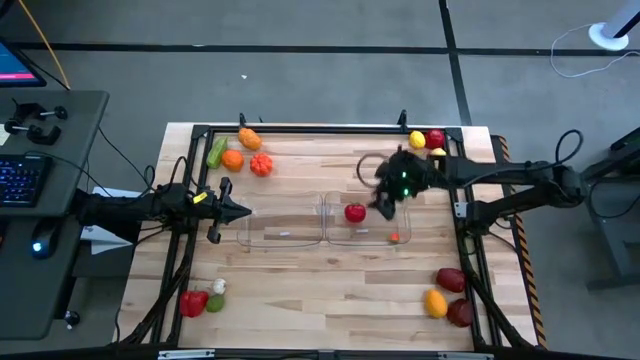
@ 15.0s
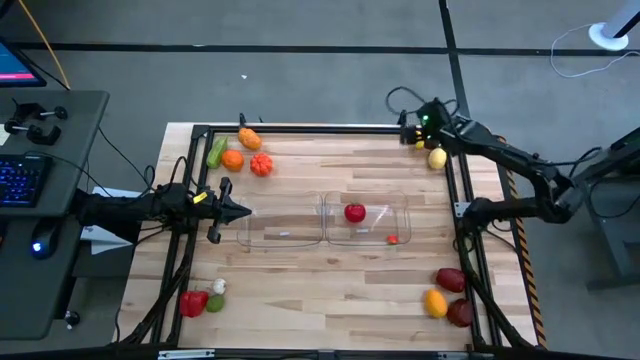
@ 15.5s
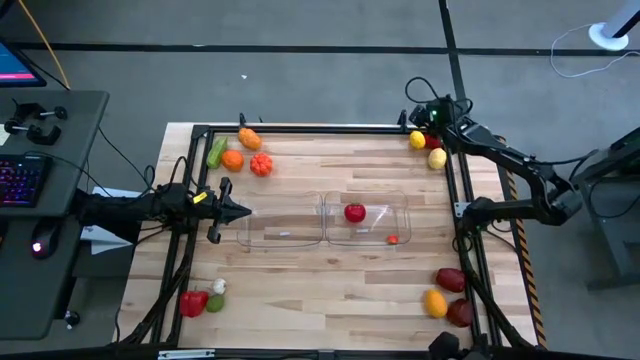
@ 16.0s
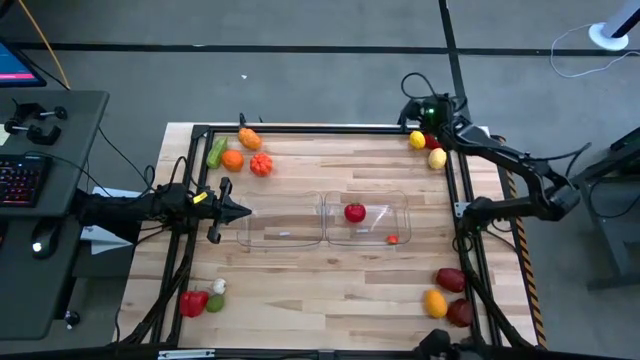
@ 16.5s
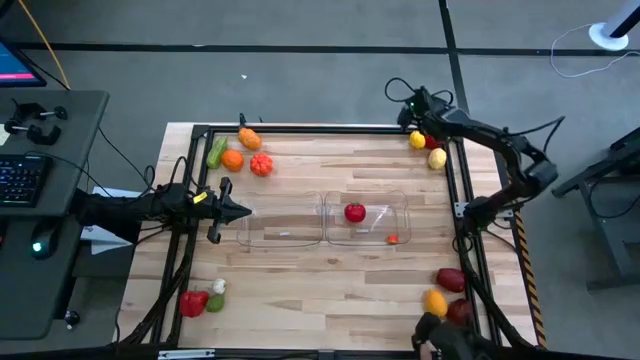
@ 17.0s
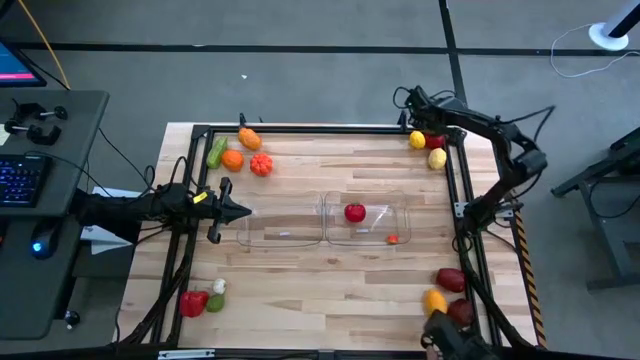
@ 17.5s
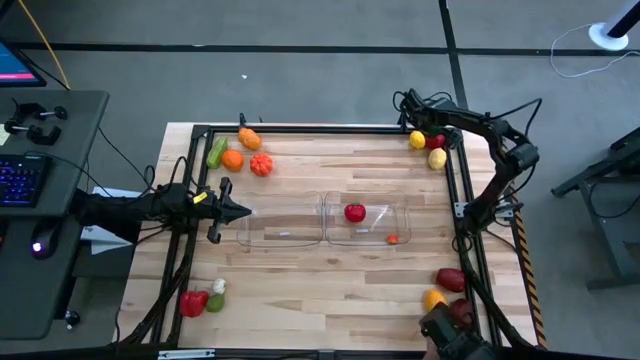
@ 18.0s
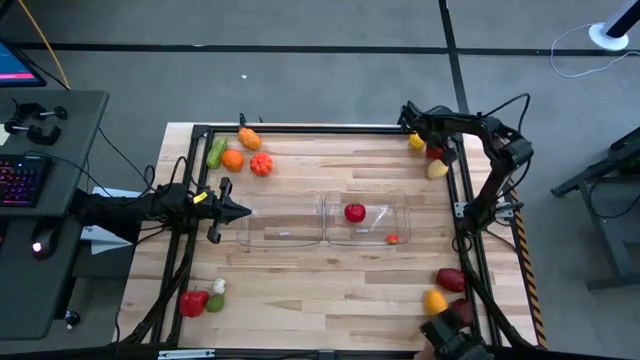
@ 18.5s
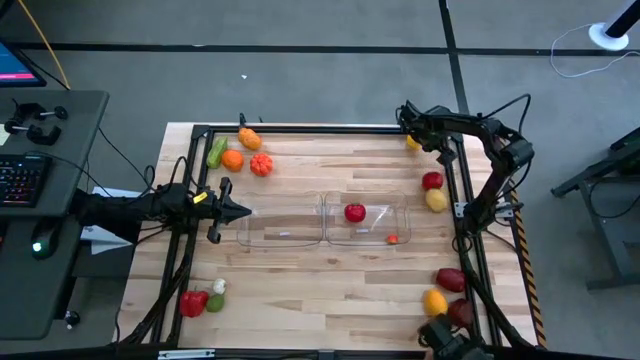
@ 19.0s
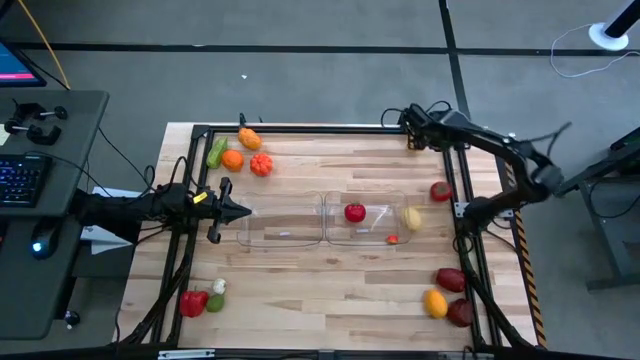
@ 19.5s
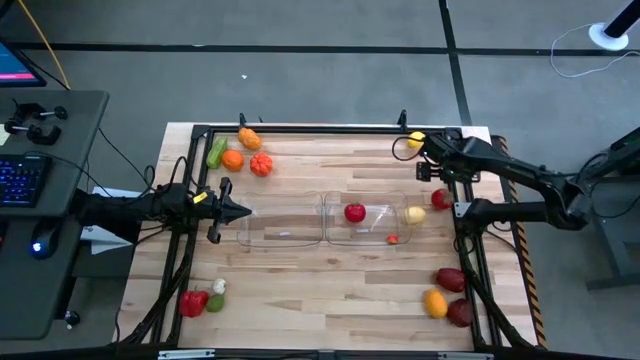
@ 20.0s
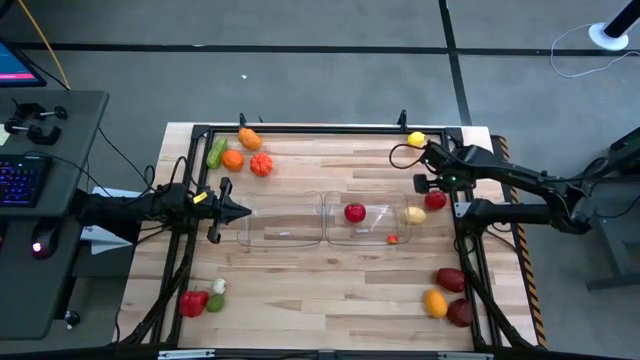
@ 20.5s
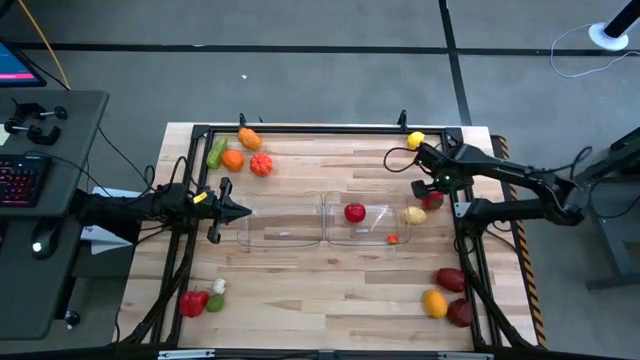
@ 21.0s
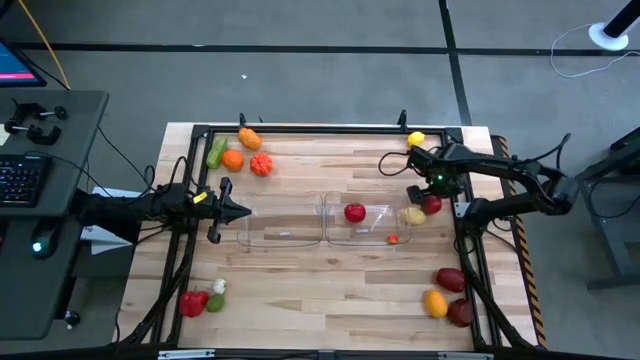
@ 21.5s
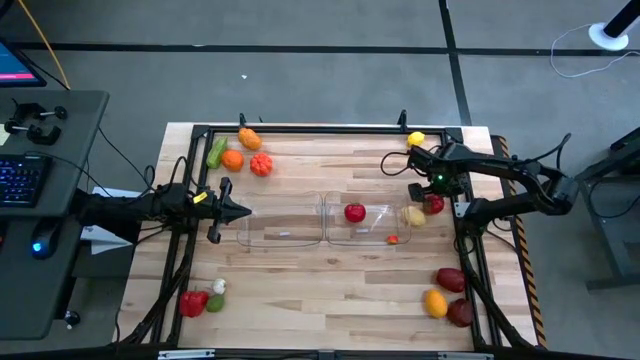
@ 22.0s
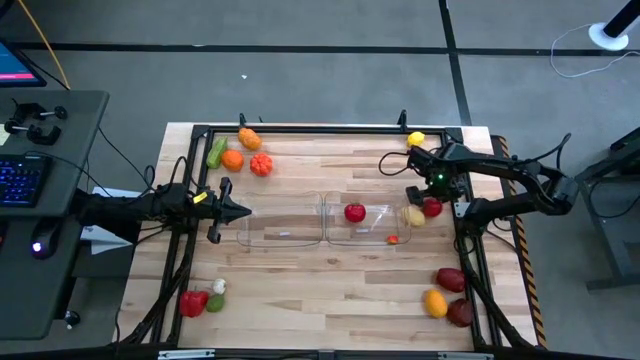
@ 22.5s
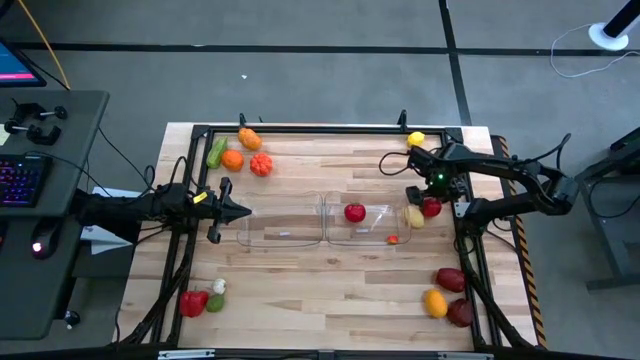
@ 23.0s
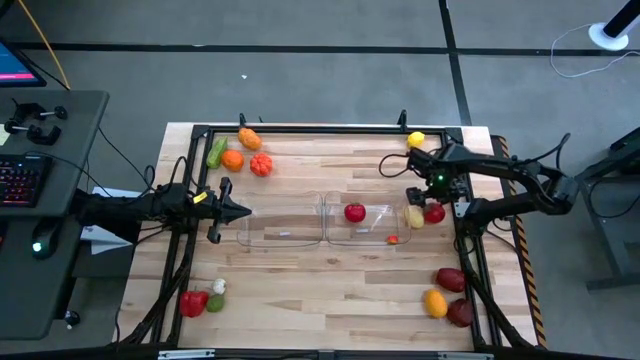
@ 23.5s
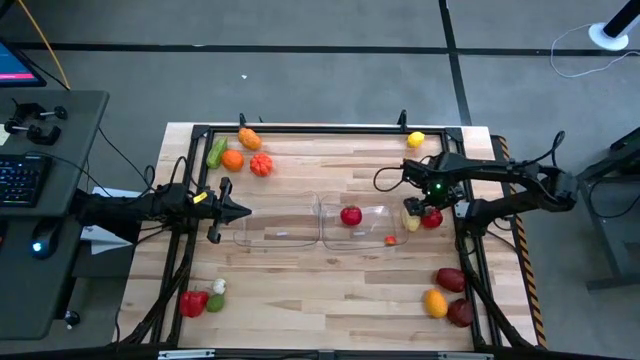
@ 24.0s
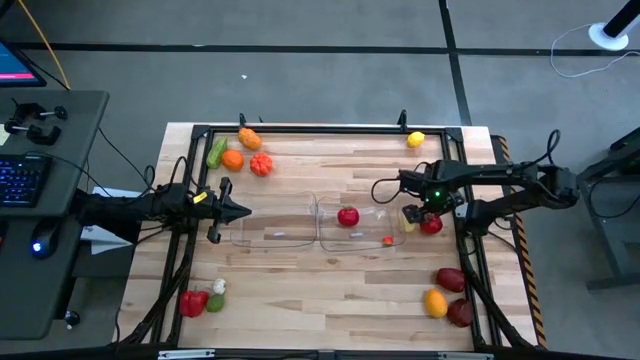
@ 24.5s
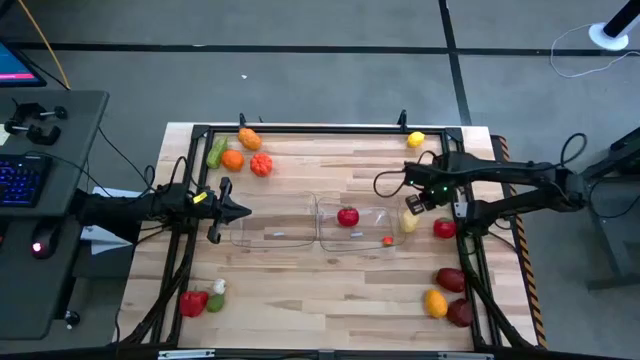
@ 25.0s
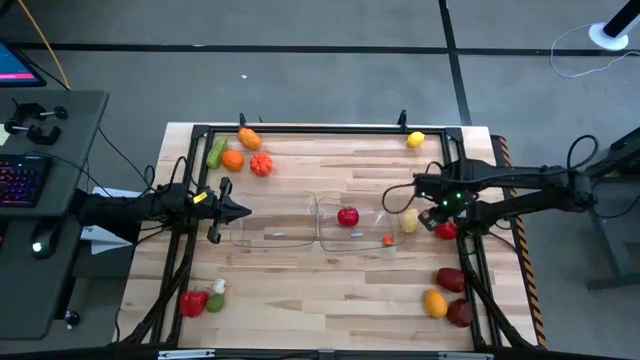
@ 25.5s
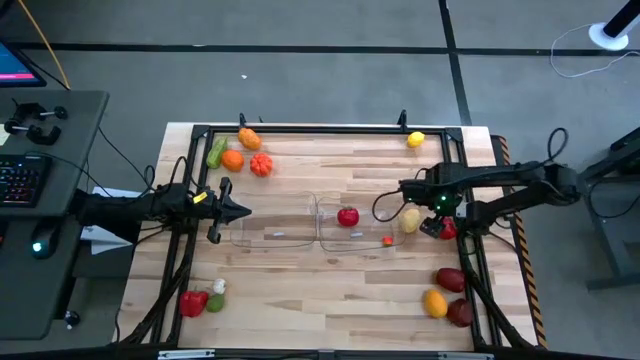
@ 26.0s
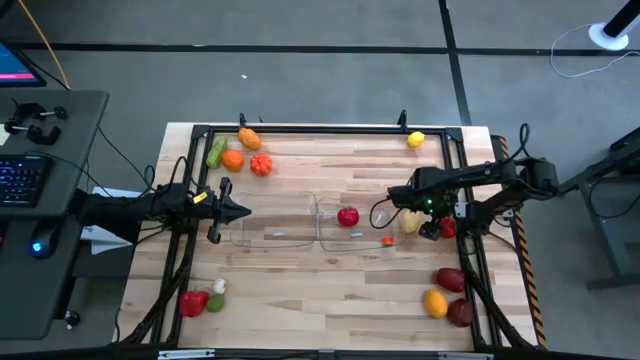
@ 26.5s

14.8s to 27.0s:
Task: Sort produce into baskets
Put the red tomato into the right transparent bin

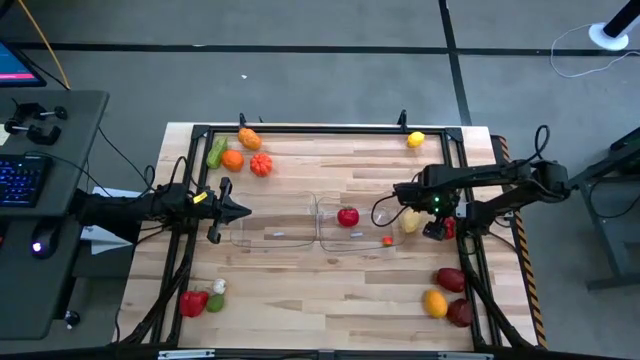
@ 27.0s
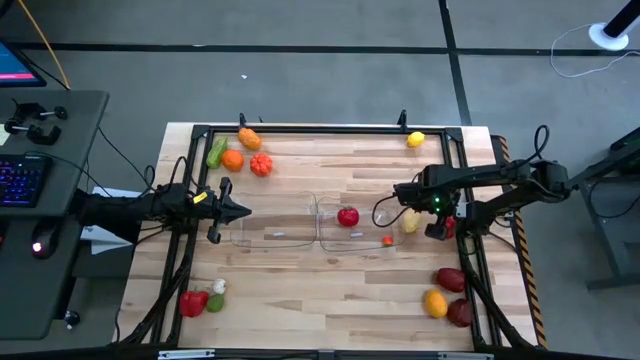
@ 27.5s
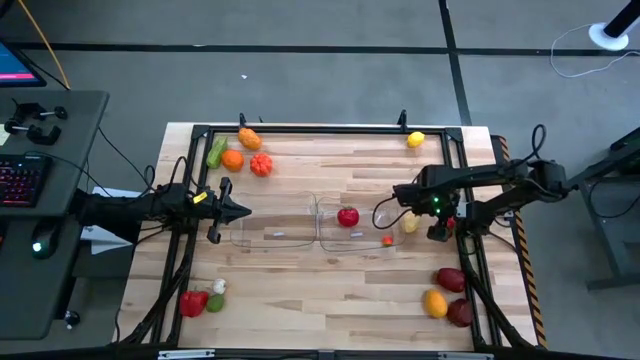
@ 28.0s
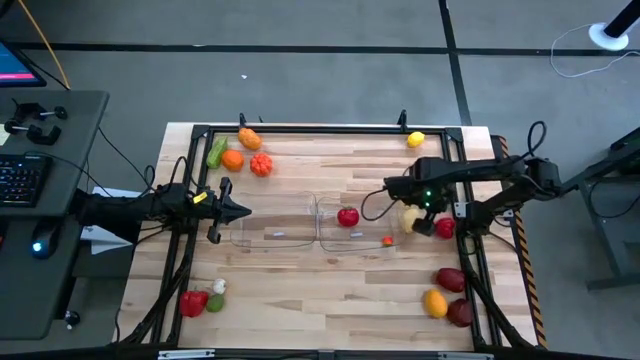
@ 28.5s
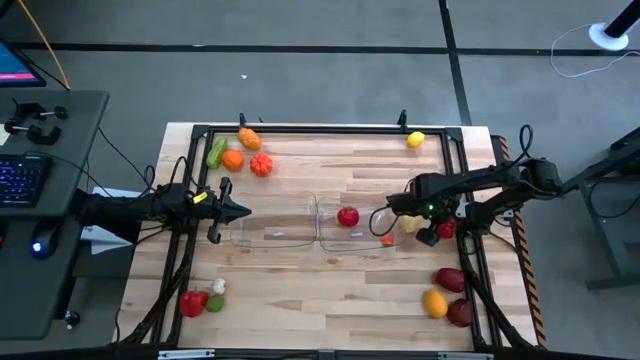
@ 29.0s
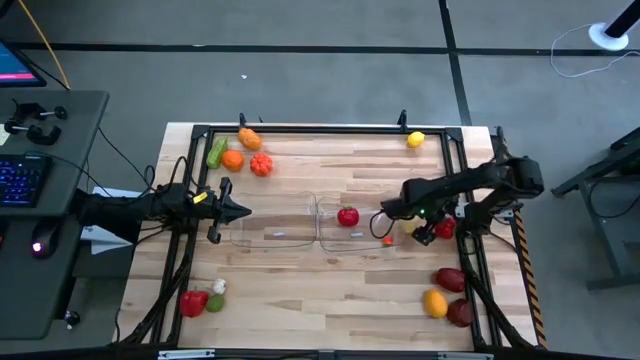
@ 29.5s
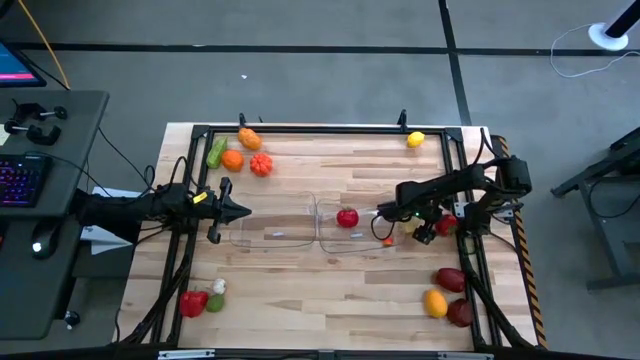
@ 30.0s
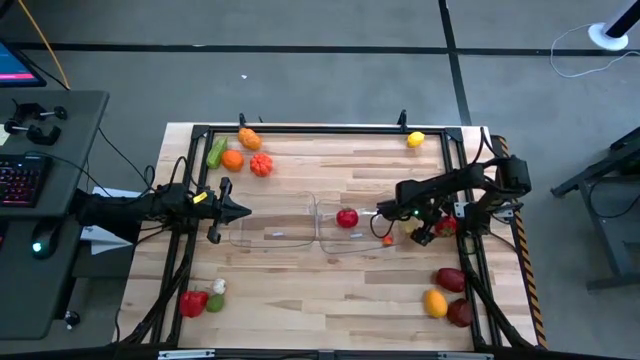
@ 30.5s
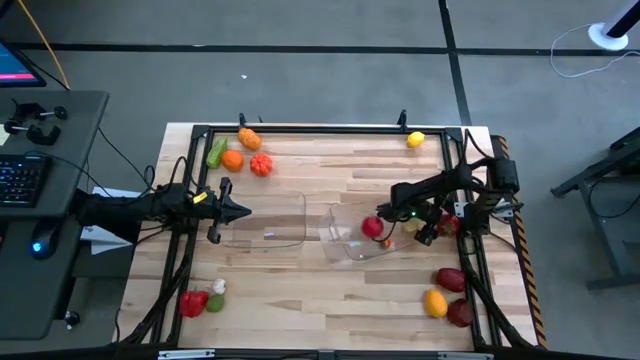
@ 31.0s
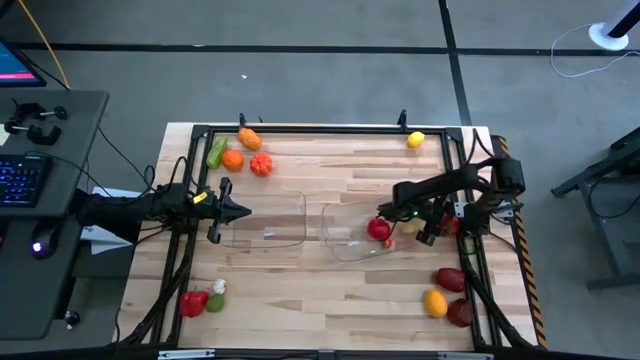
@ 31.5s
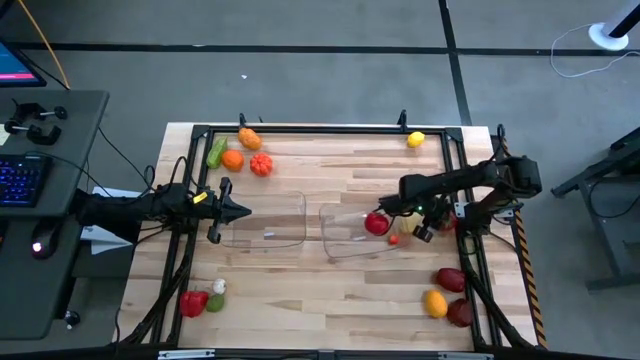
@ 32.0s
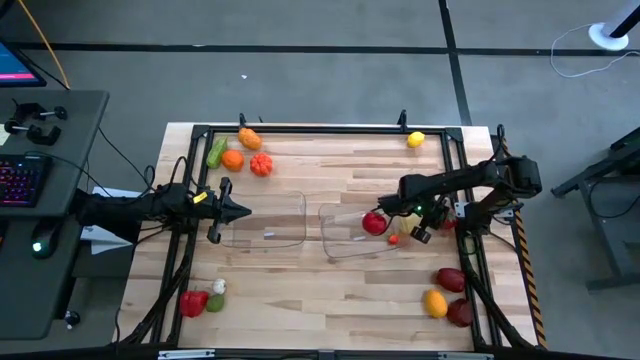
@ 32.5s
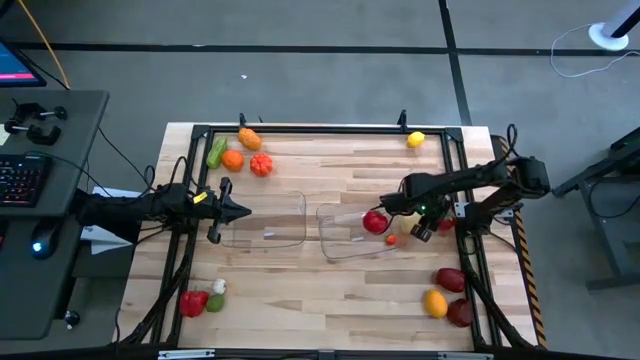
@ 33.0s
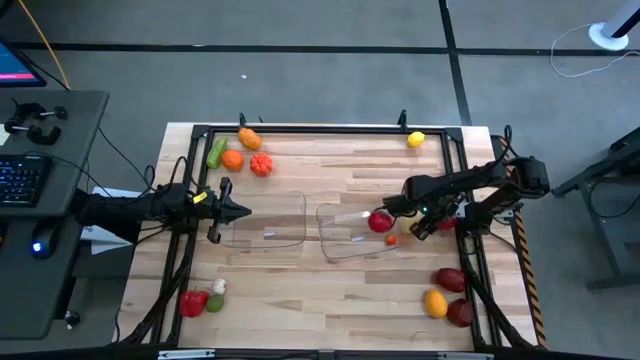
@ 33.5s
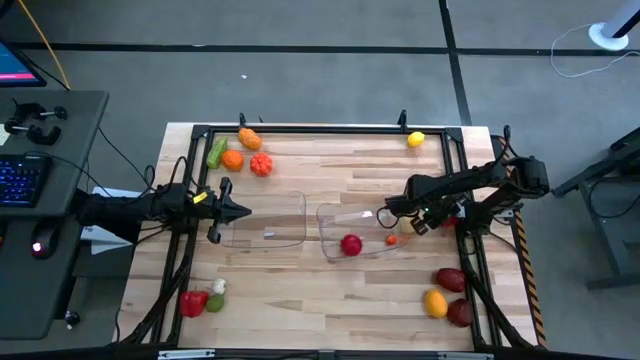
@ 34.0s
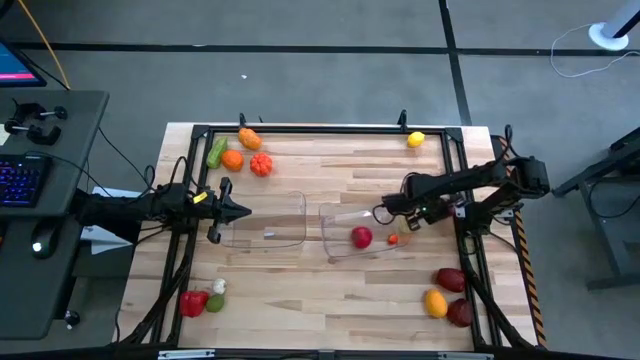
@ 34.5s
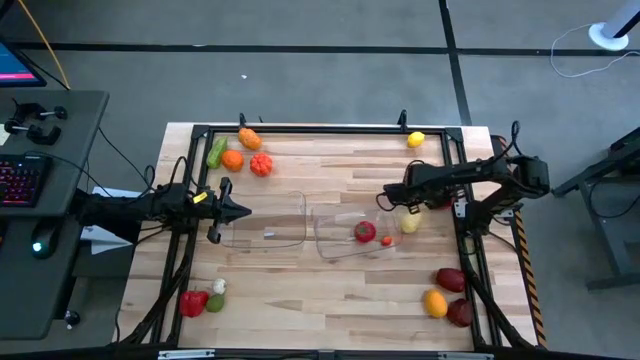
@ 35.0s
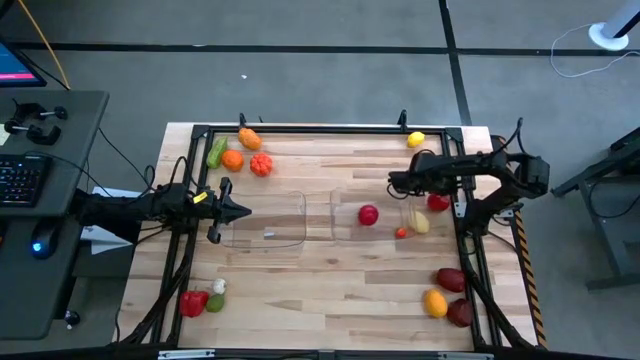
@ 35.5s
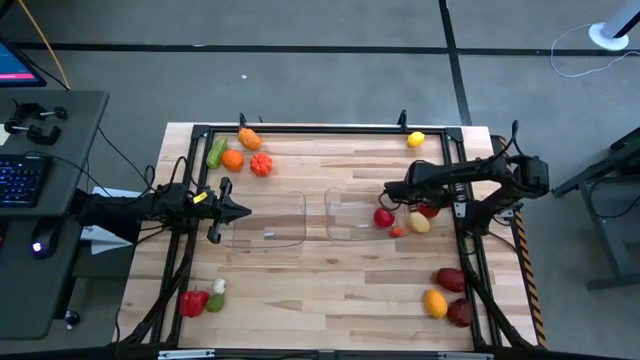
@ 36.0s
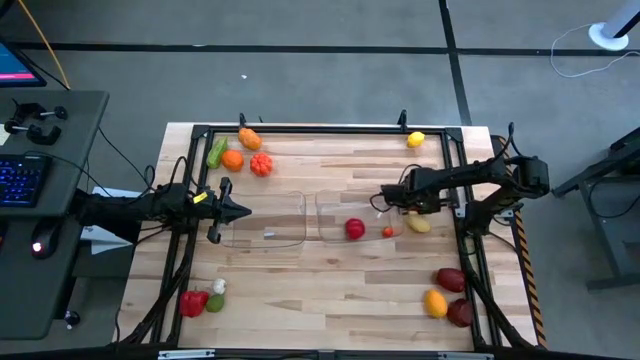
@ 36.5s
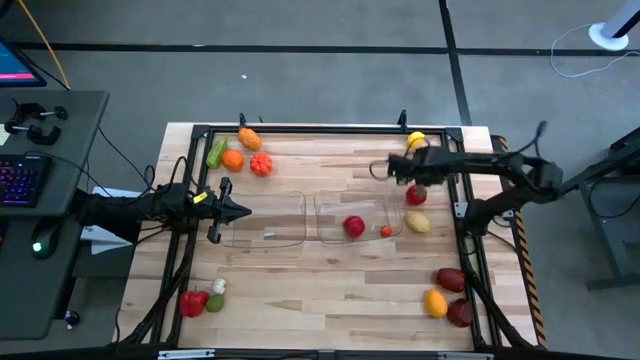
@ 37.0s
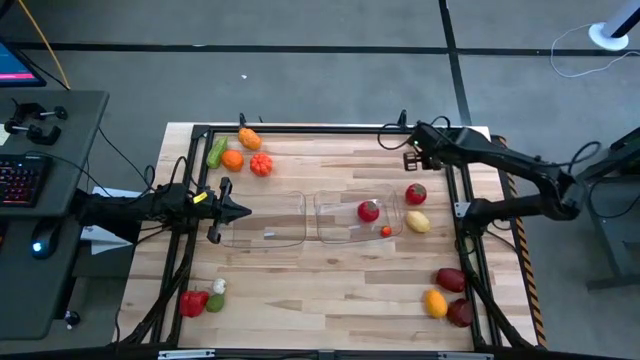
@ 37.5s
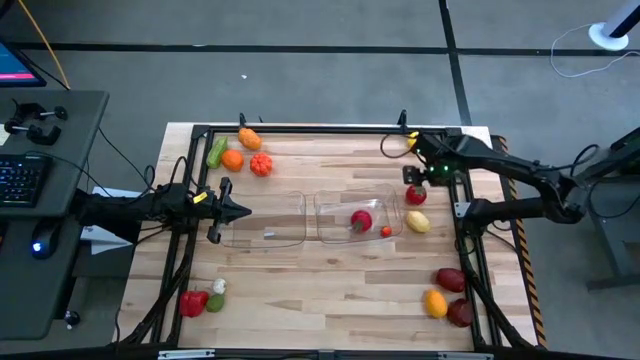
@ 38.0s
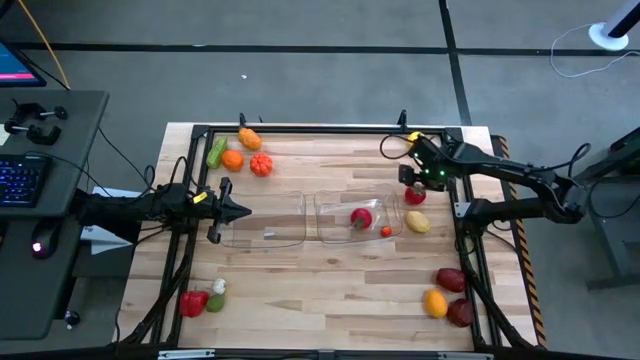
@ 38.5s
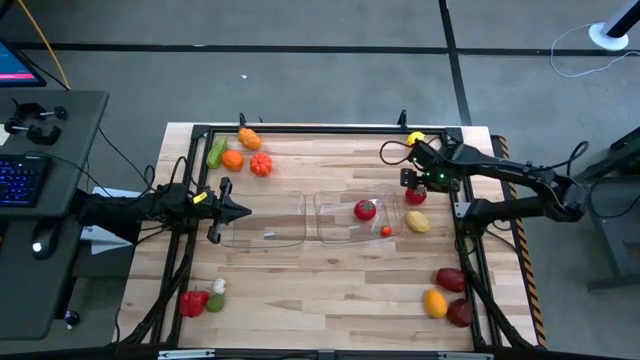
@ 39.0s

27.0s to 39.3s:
Put the red tomato into the right transparent bin
